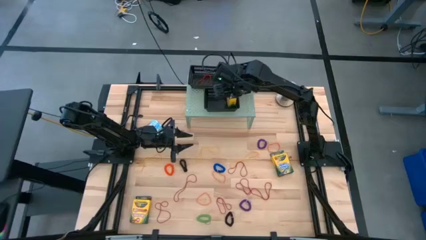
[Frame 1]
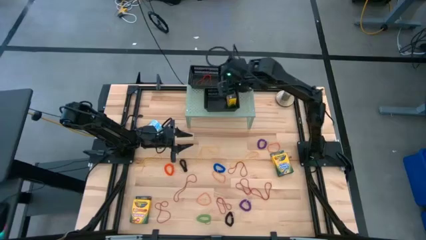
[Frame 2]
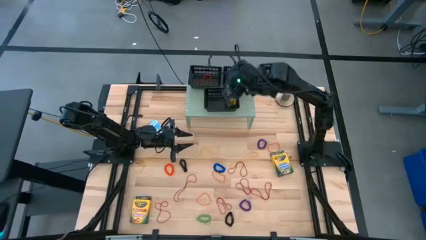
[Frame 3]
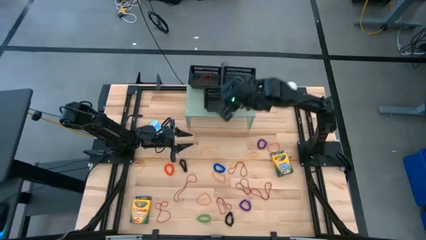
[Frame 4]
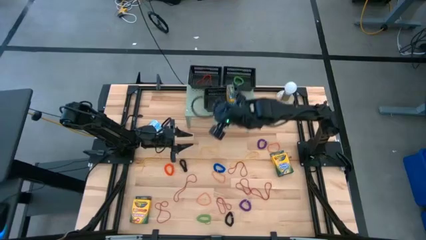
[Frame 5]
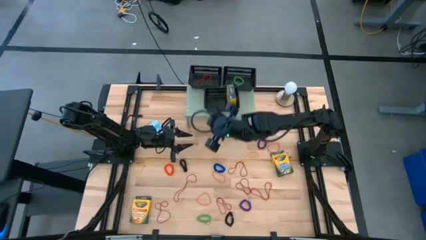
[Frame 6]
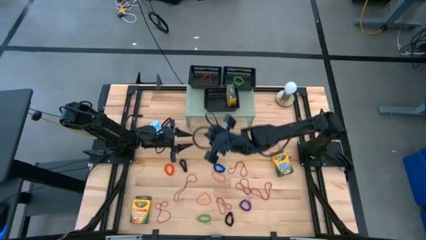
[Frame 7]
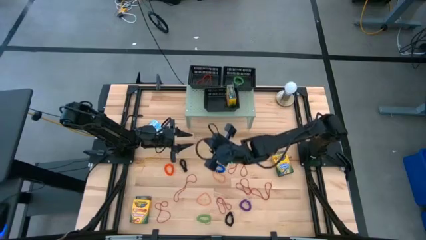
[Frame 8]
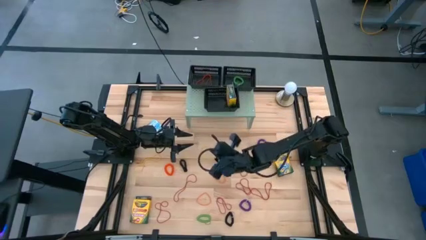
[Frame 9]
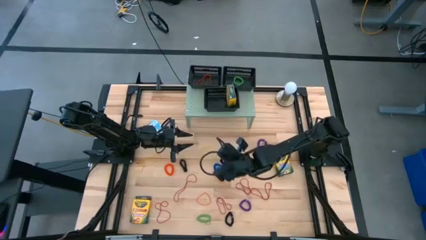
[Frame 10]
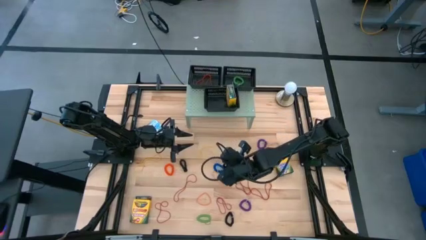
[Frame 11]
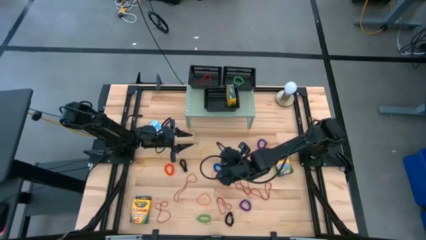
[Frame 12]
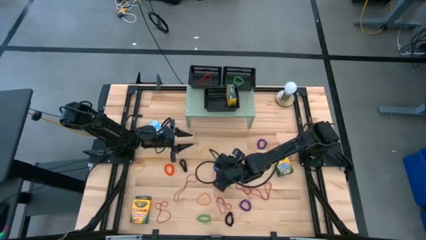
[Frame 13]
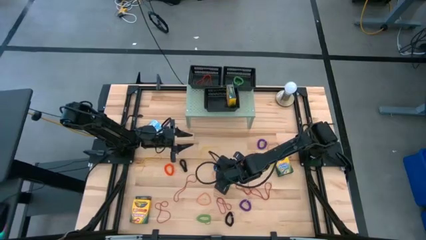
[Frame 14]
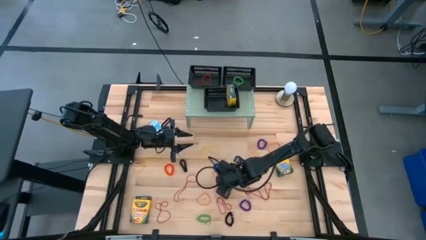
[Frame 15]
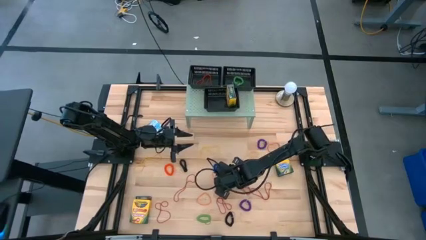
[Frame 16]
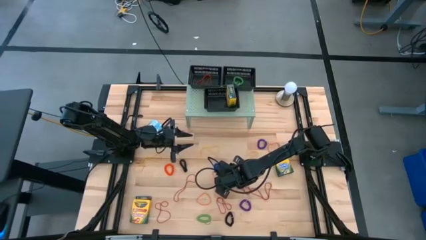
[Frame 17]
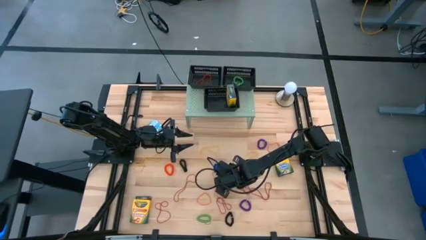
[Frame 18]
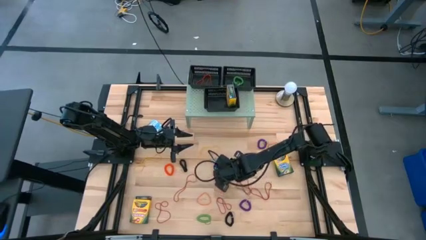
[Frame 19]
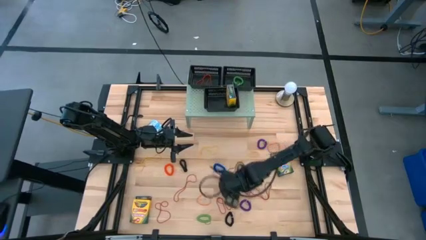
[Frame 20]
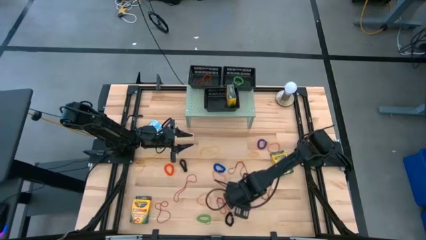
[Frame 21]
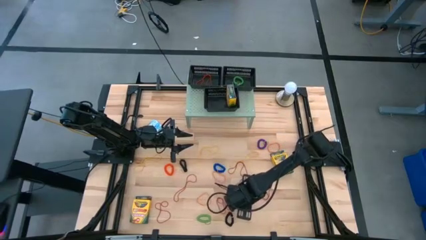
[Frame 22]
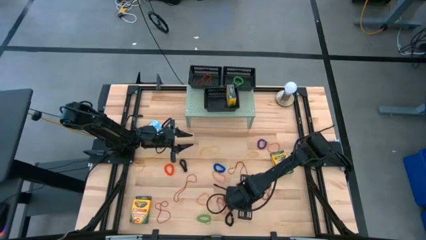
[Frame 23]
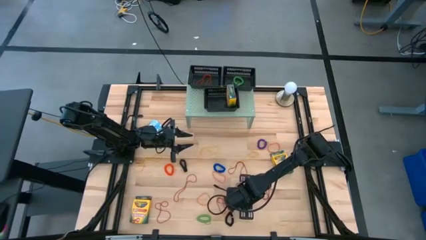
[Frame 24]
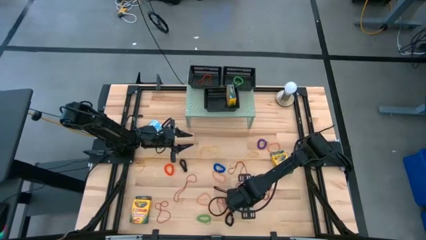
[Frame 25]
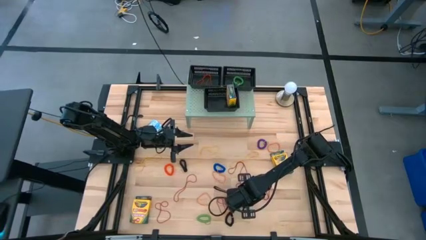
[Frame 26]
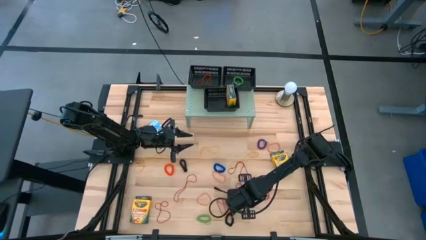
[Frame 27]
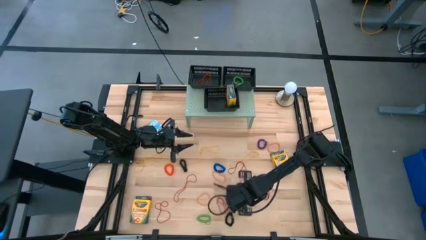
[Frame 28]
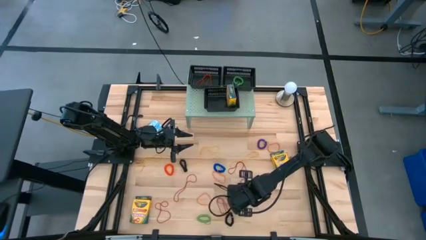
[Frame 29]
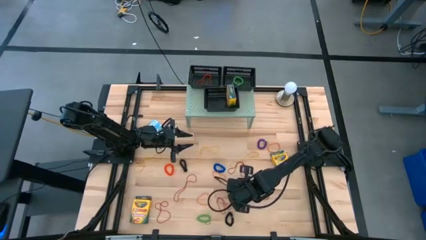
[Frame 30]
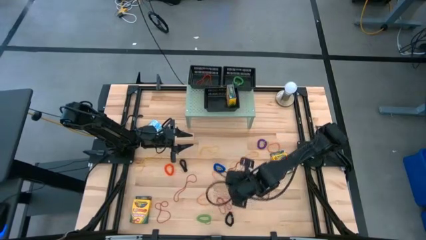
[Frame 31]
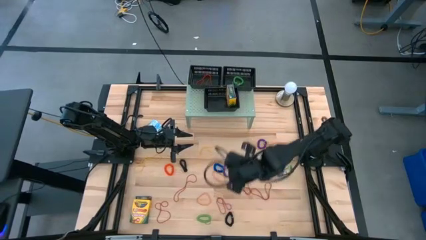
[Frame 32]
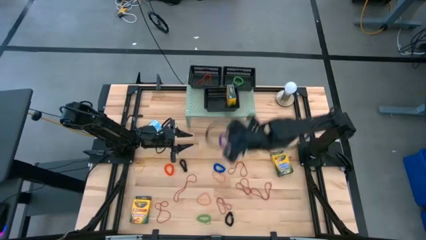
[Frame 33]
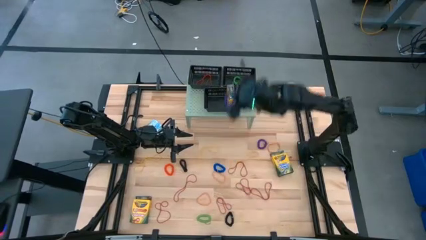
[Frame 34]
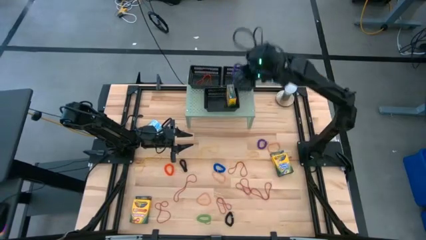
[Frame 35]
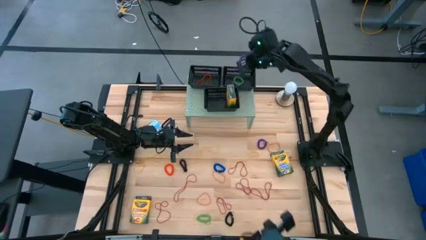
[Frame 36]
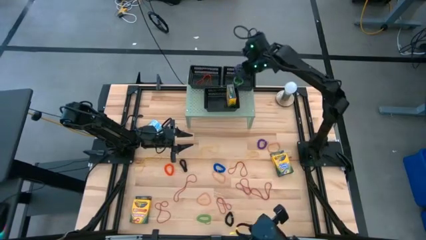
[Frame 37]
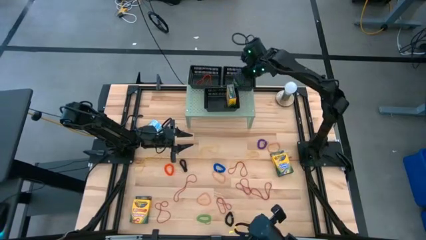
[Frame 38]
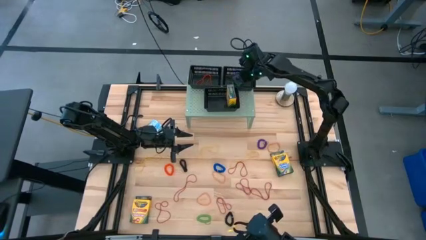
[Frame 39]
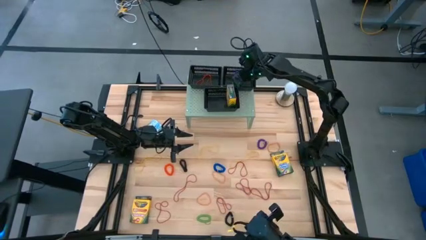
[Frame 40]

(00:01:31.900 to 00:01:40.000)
Task: Pick & Place Office Desk Supplies
Put the violet spiral keychain the top right black bin

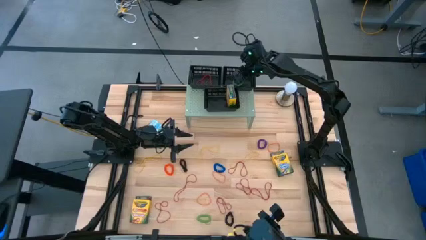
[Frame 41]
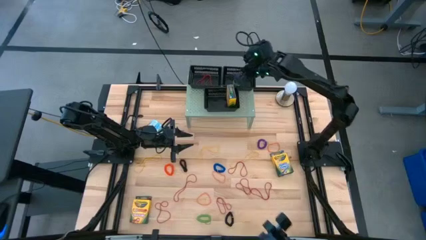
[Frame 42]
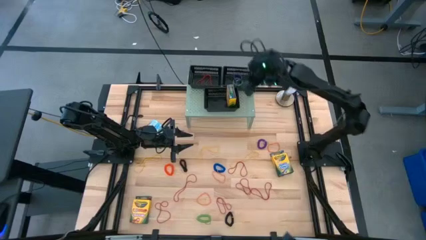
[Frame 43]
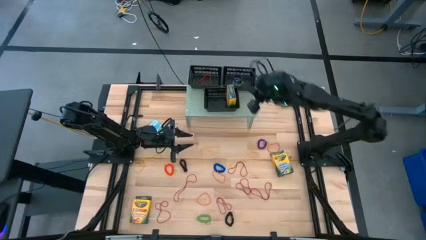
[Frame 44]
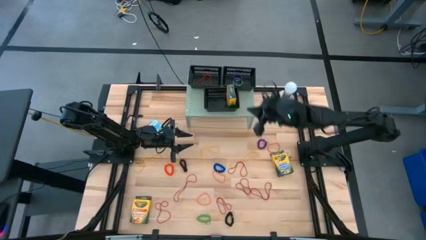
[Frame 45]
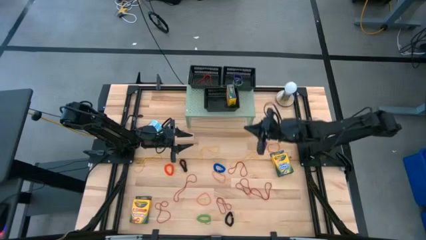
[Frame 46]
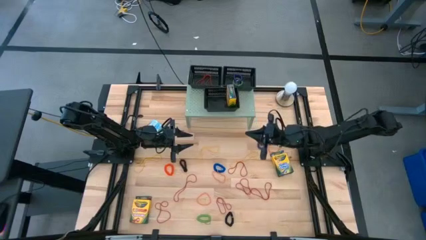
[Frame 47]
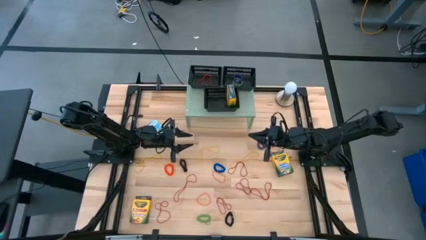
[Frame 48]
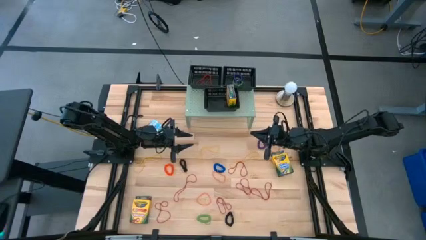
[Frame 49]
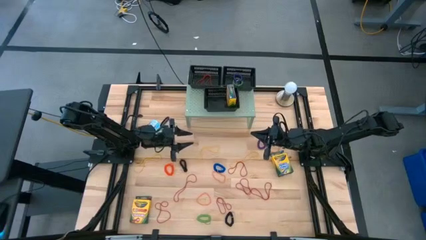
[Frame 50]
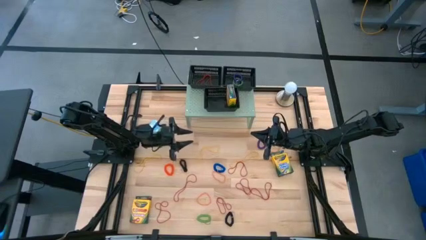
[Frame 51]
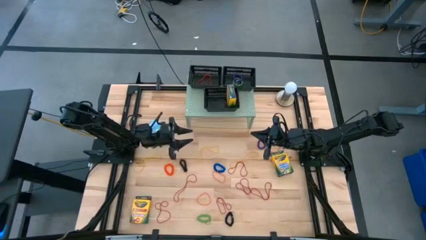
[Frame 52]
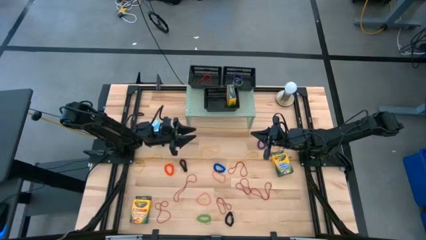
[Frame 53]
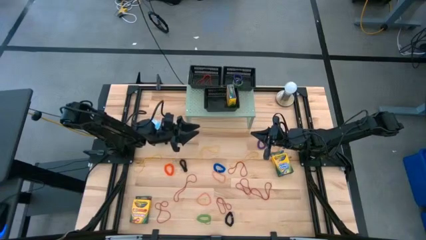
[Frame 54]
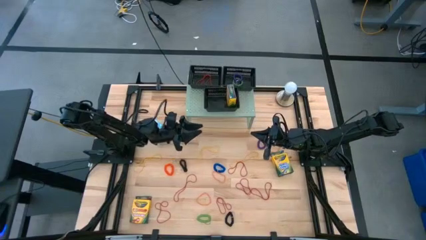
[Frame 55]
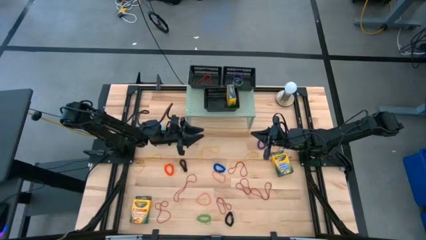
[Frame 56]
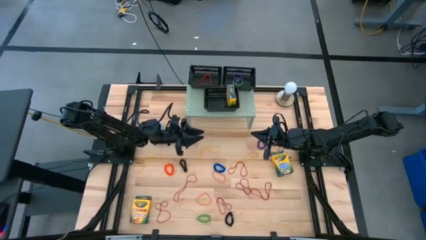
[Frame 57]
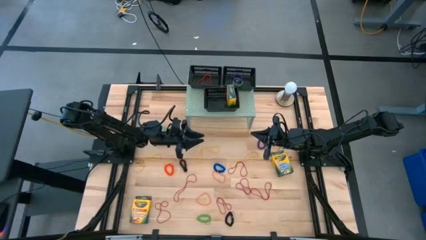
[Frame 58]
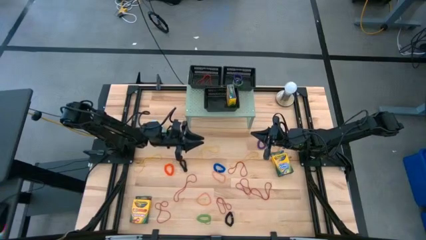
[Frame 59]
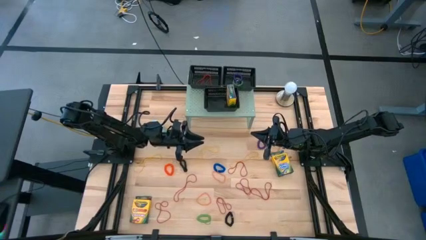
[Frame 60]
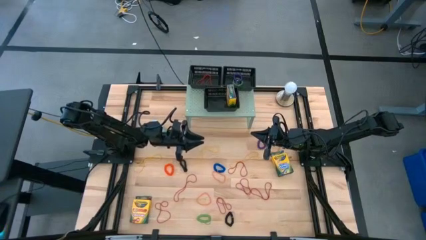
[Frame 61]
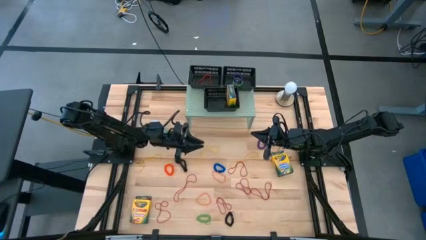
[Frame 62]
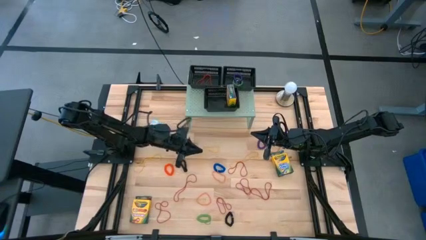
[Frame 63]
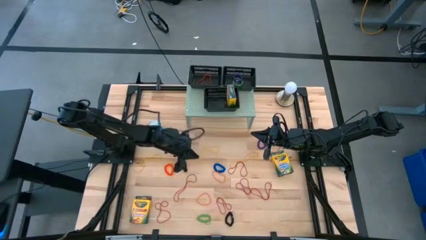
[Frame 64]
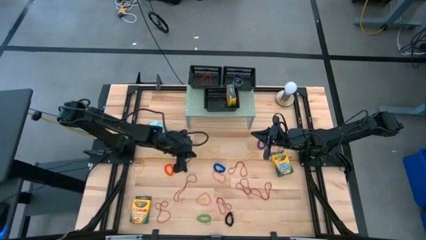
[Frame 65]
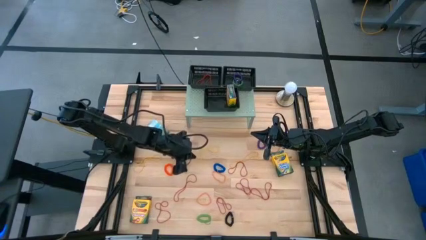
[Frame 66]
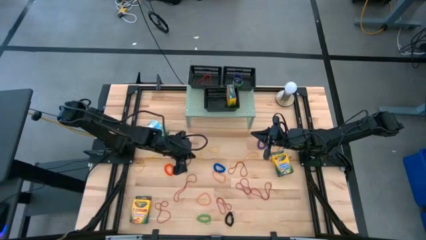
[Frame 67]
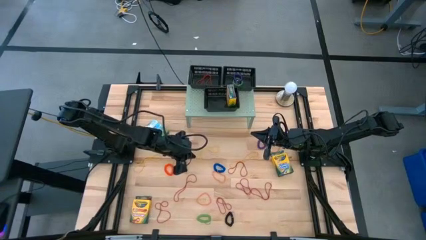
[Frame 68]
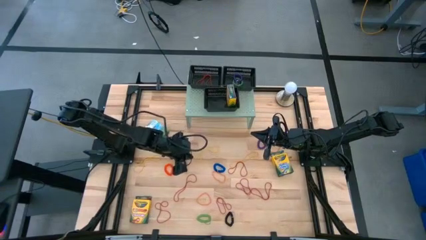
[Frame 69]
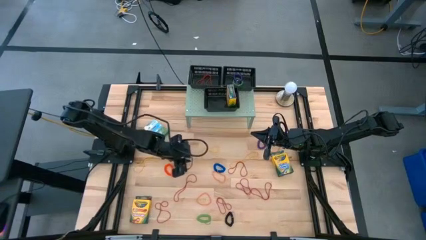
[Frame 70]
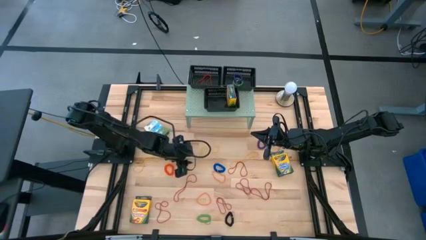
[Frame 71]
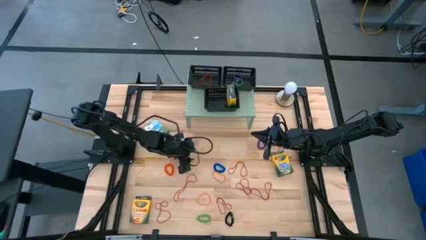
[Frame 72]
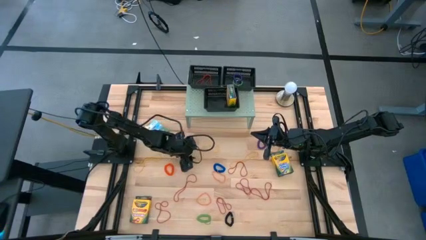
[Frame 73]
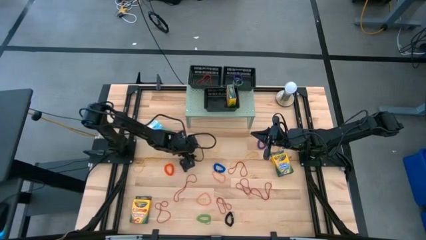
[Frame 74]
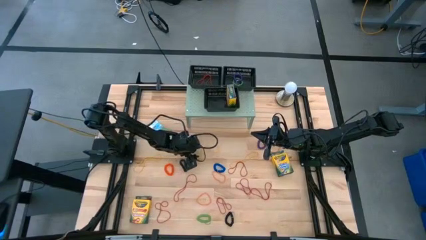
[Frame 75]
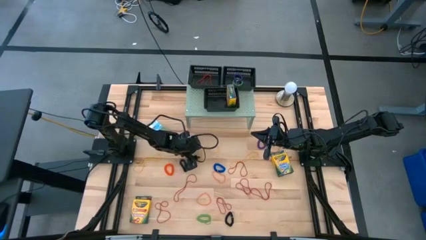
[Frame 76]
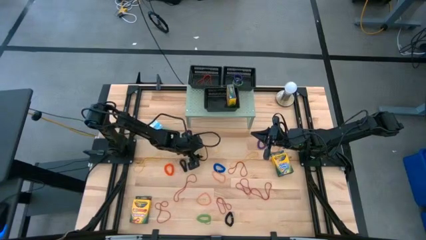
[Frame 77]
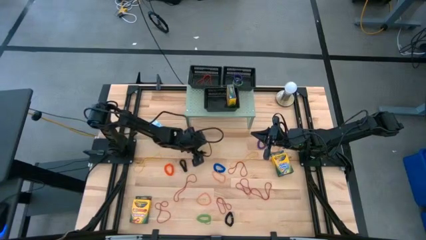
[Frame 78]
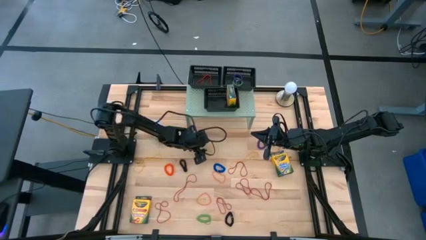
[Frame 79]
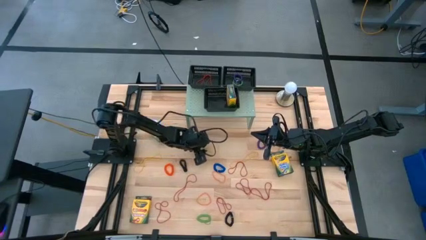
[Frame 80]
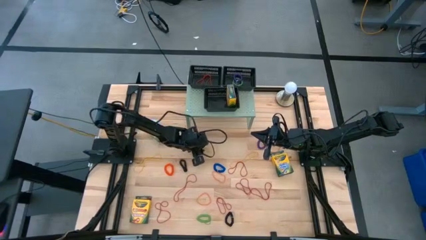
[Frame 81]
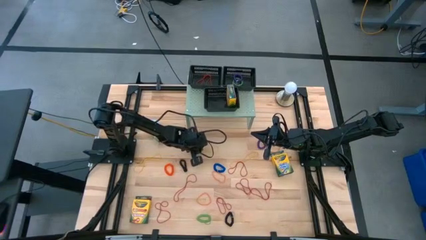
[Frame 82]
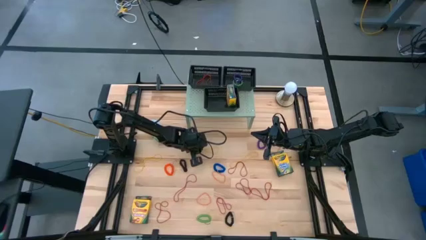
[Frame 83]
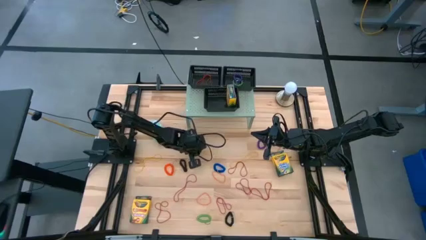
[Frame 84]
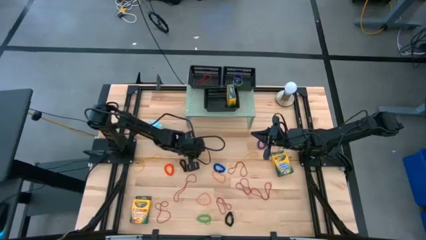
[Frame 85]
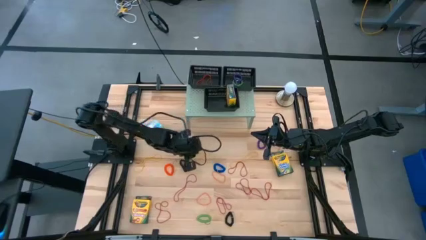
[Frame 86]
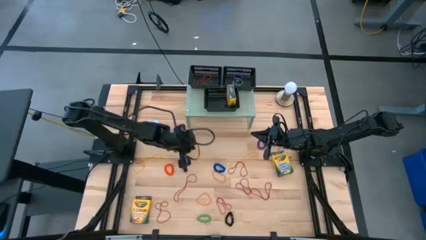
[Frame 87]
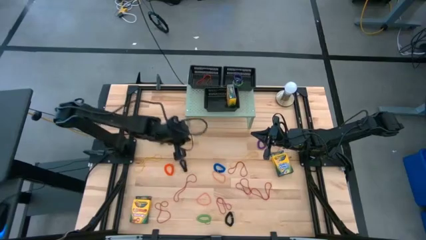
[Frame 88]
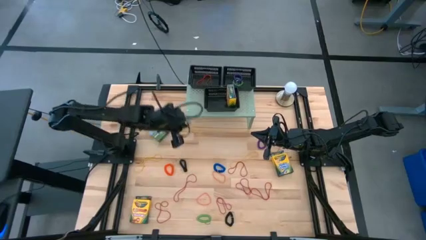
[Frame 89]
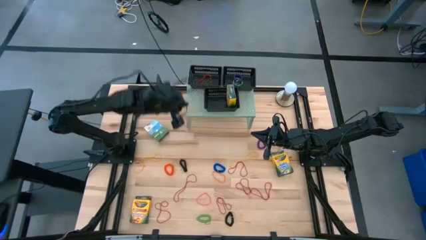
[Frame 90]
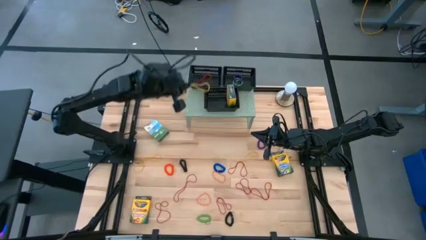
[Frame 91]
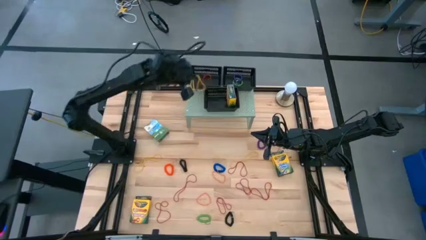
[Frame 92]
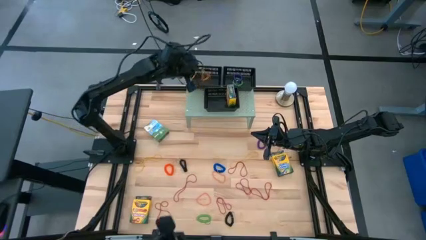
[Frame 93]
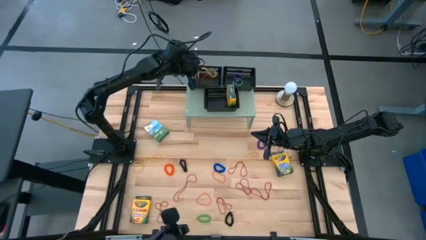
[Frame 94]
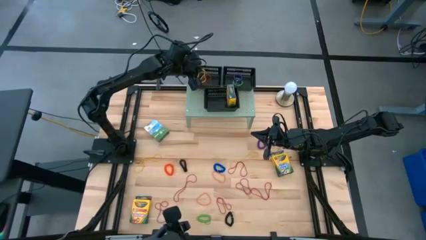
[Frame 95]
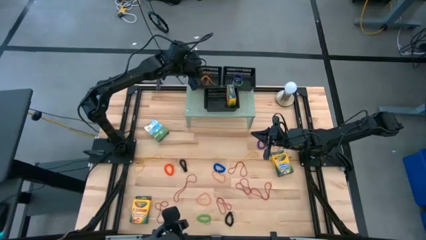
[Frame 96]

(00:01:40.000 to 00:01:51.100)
Put the yellow rubberband into the top left black bin
